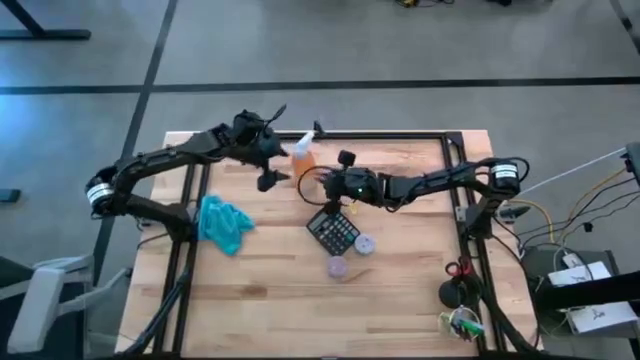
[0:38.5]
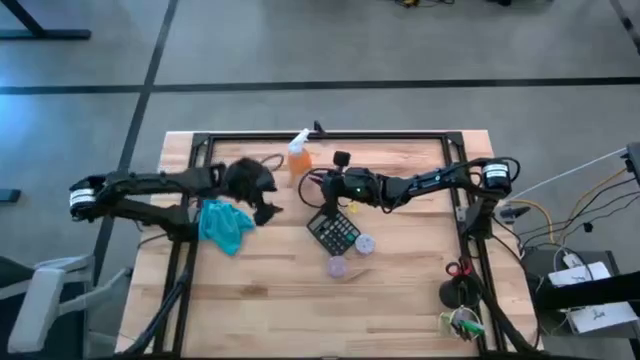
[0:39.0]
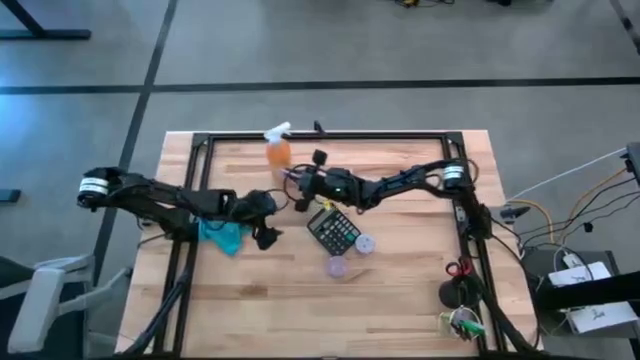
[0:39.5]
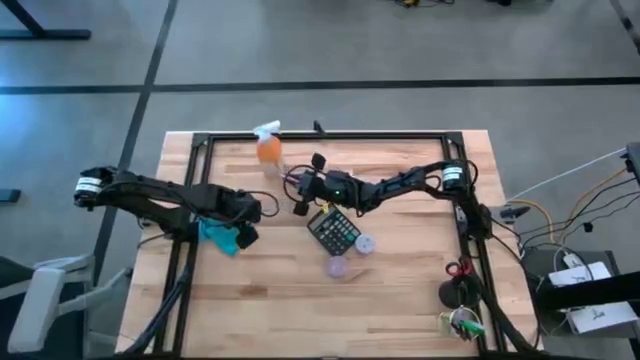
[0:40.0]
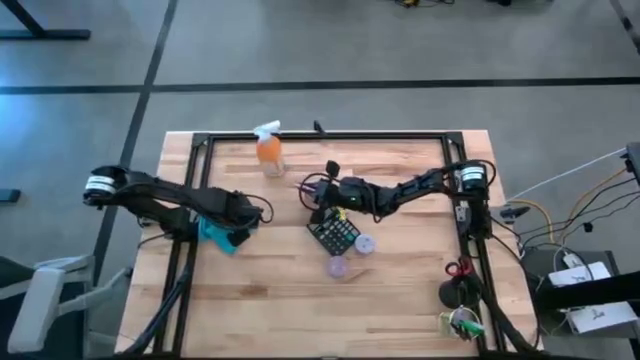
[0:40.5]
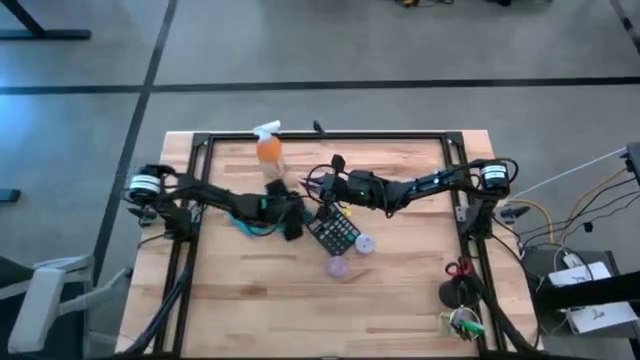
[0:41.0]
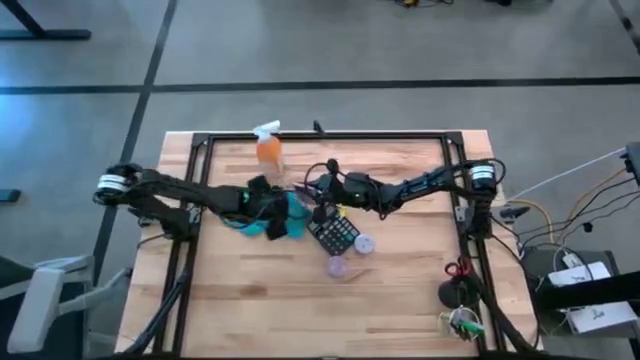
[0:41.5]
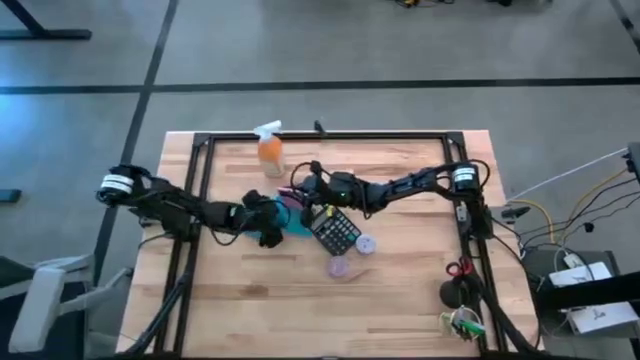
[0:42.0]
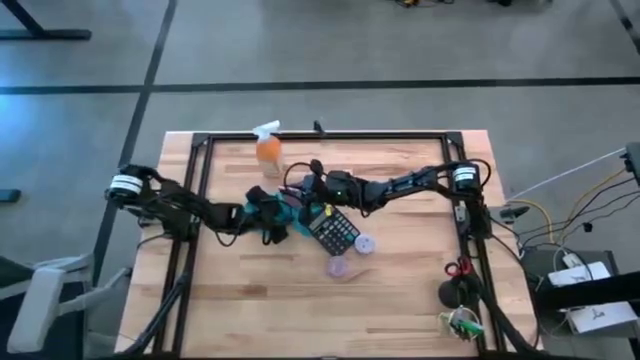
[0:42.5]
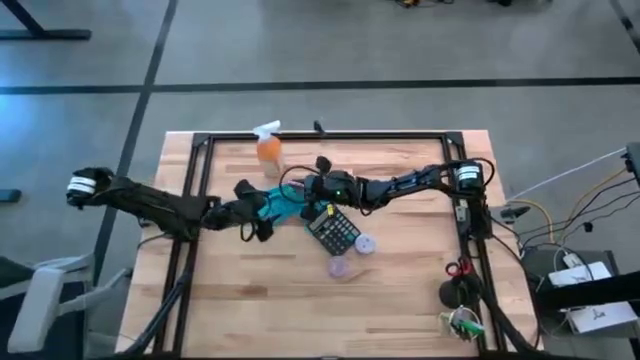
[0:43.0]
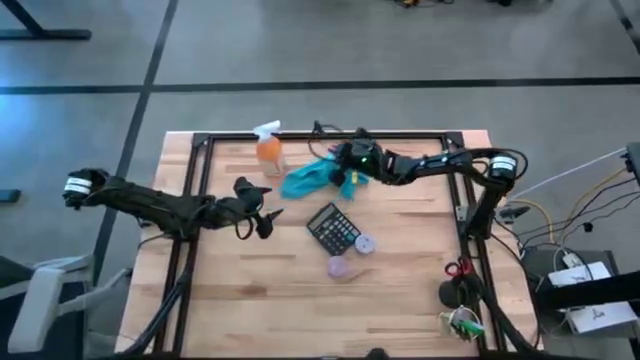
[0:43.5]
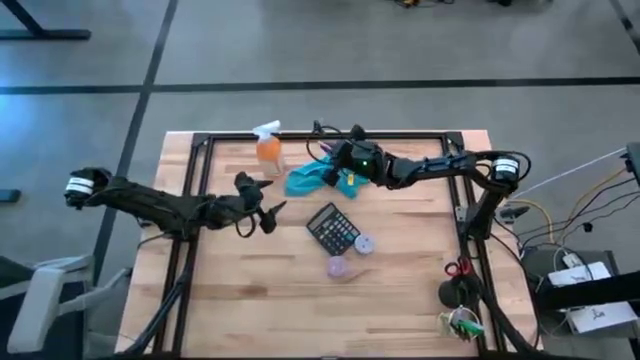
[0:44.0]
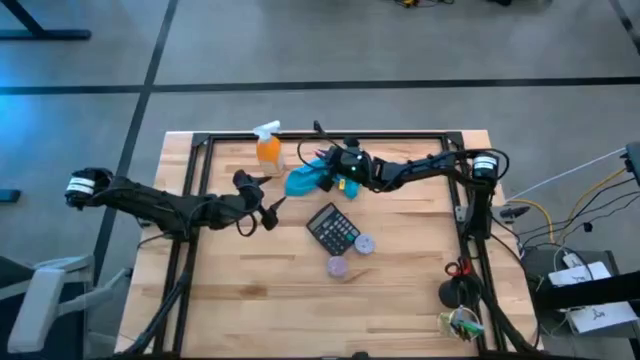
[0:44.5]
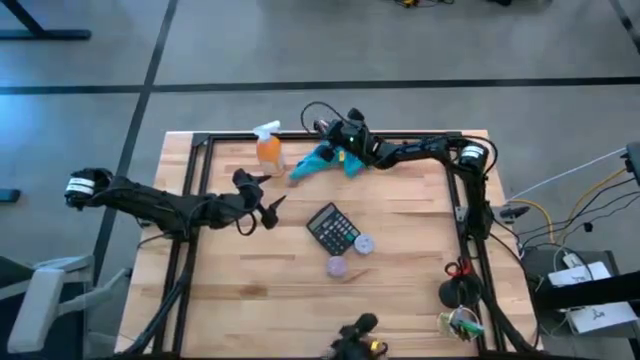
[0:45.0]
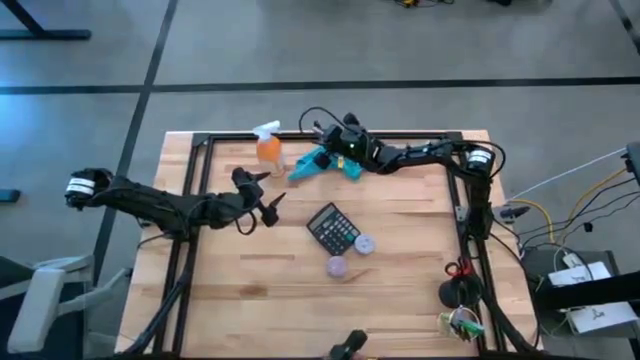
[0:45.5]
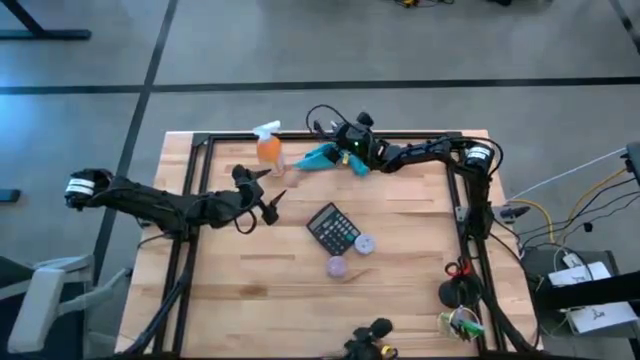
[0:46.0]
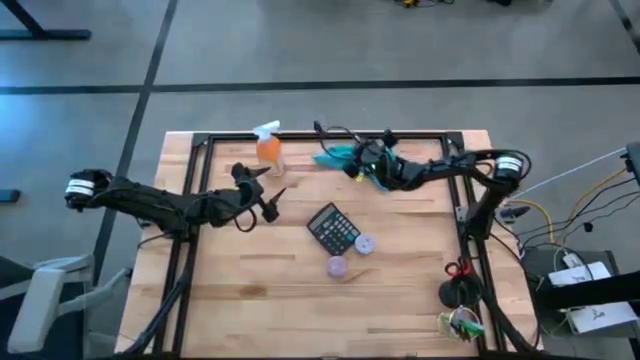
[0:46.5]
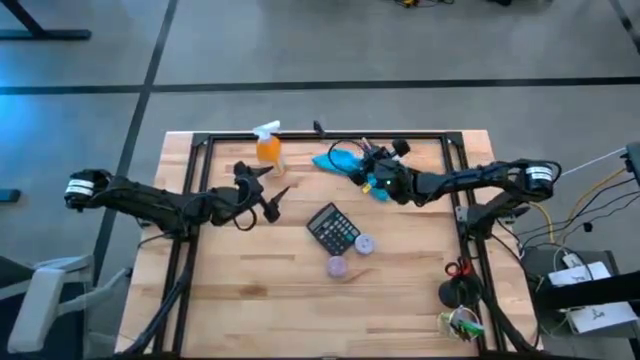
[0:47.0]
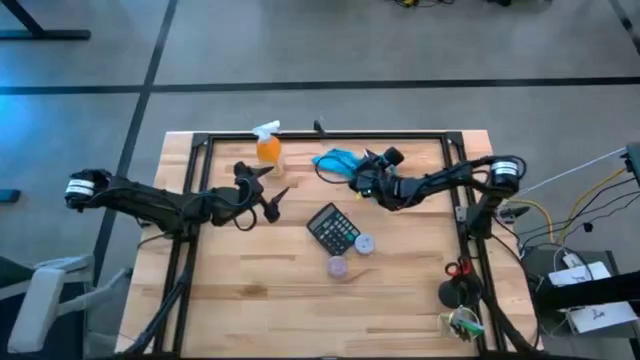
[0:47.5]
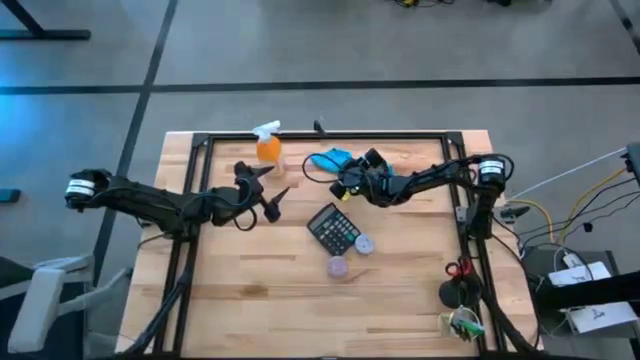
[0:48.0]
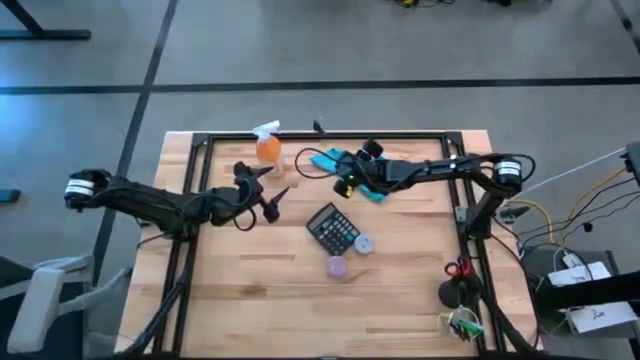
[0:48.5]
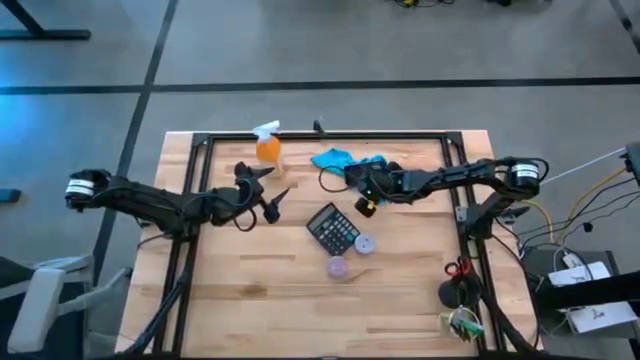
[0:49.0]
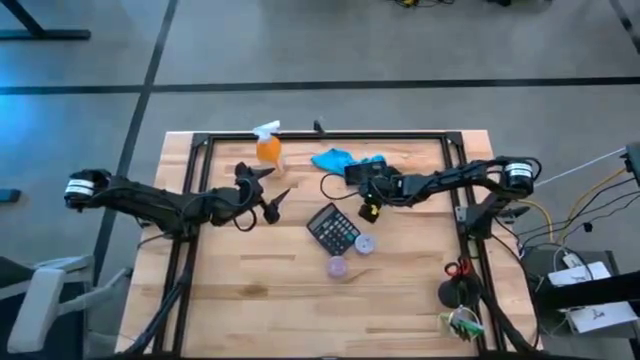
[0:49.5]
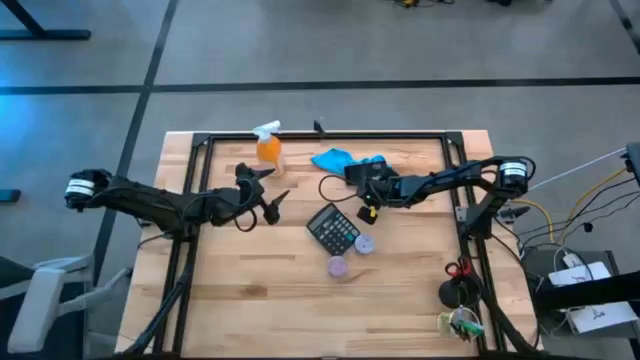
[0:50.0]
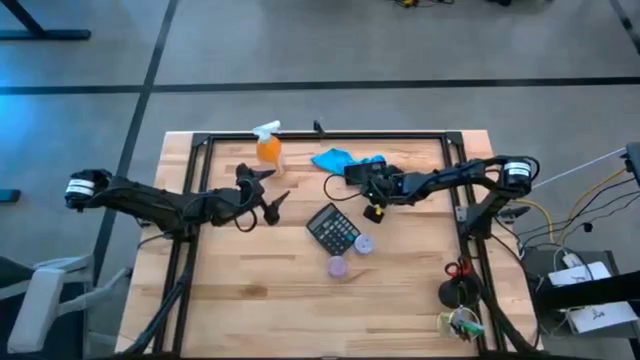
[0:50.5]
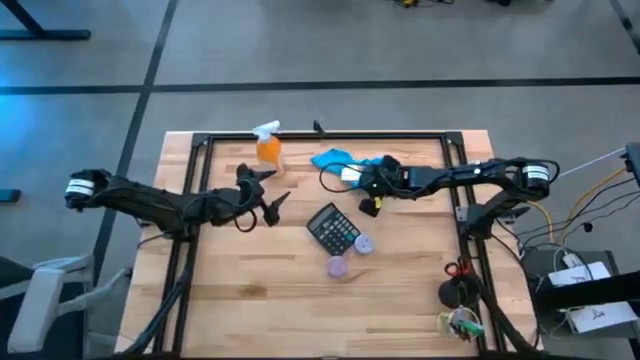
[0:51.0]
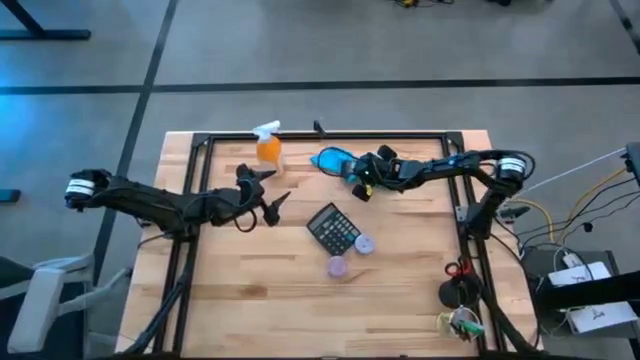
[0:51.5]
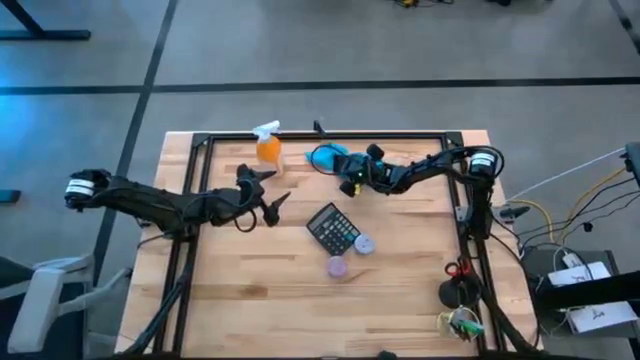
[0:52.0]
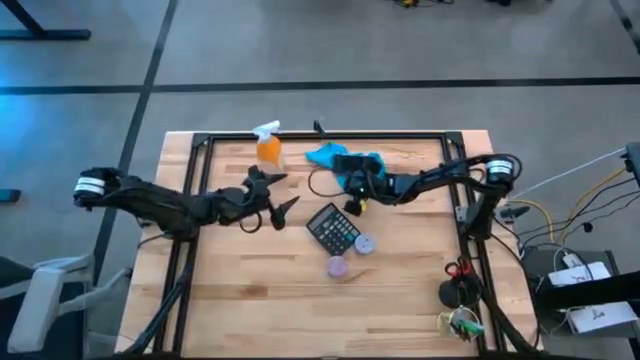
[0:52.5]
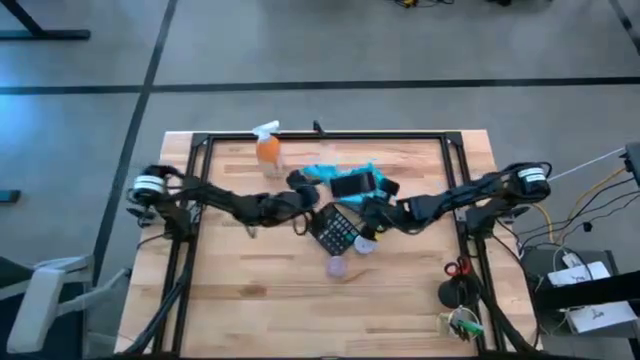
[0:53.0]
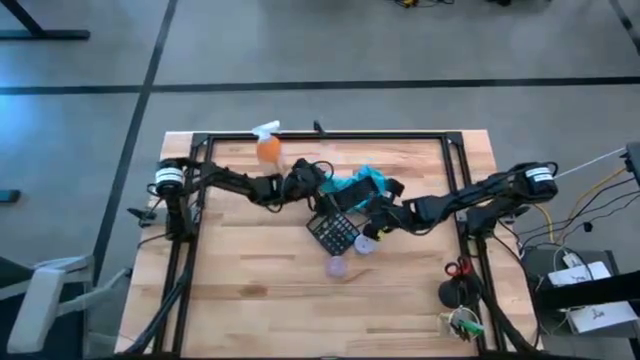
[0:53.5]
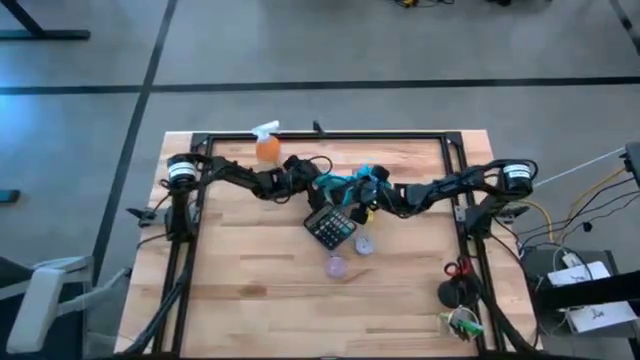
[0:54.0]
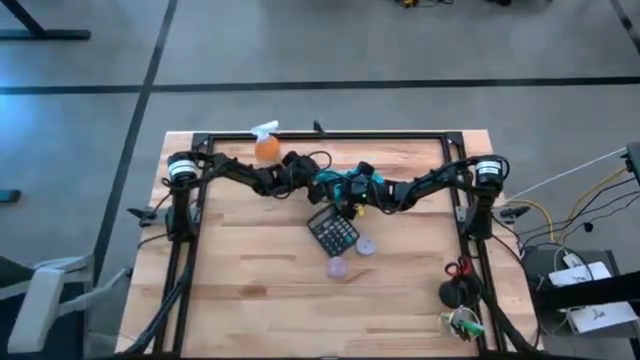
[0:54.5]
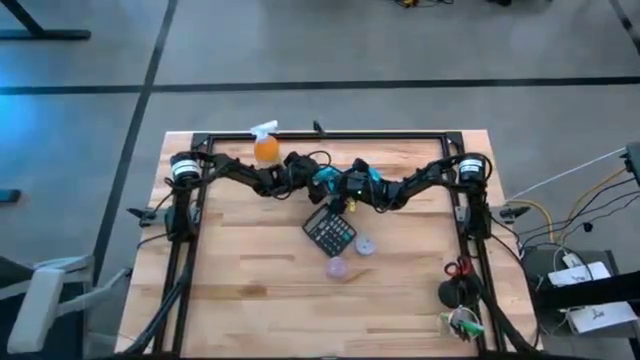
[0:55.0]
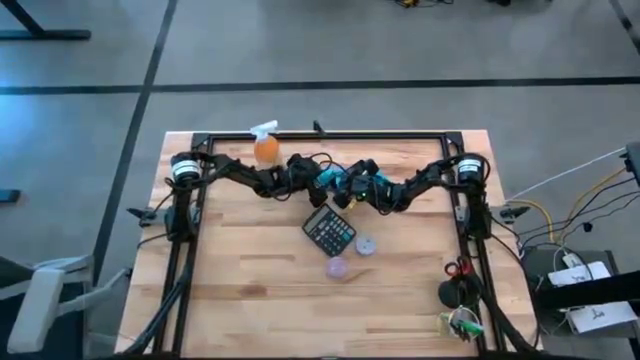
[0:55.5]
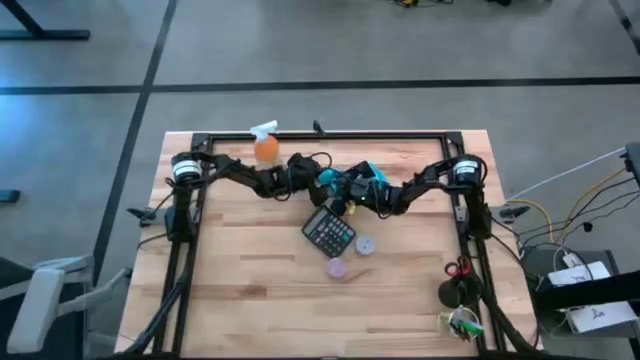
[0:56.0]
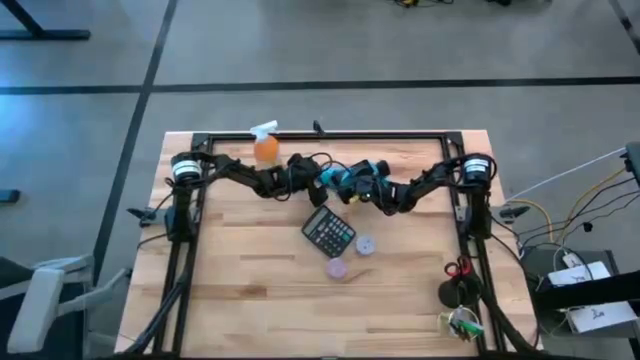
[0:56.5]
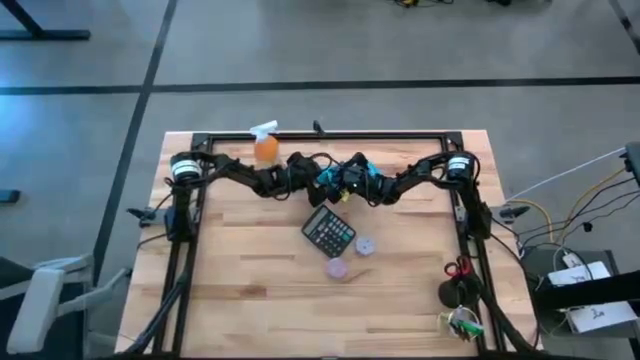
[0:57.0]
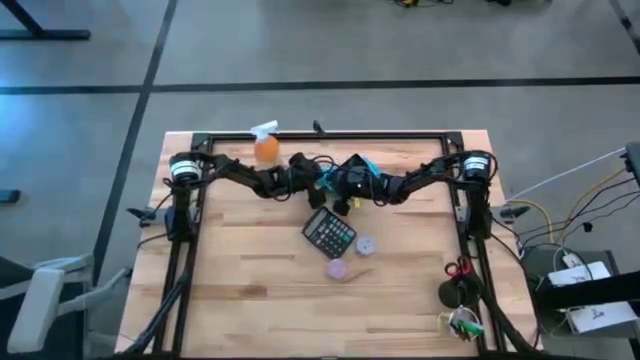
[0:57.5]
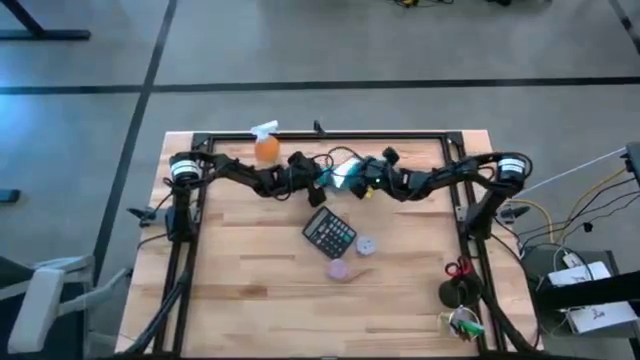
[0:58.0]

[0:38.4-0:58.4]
Task: Apply microfiber cloth
Wipe the pink cellphone using the blue microfiber cloth
